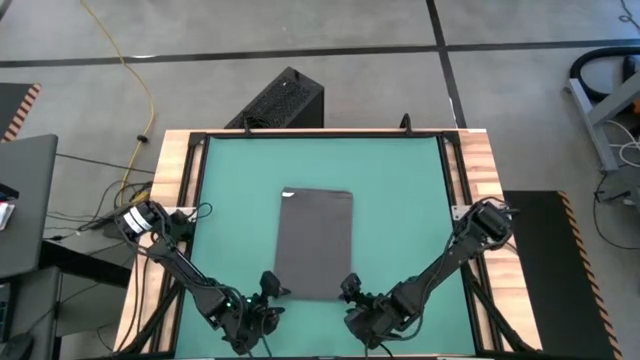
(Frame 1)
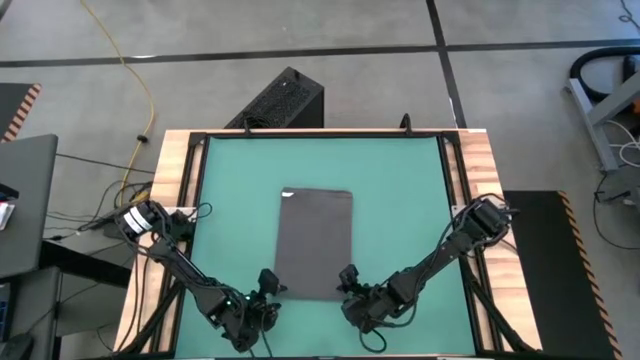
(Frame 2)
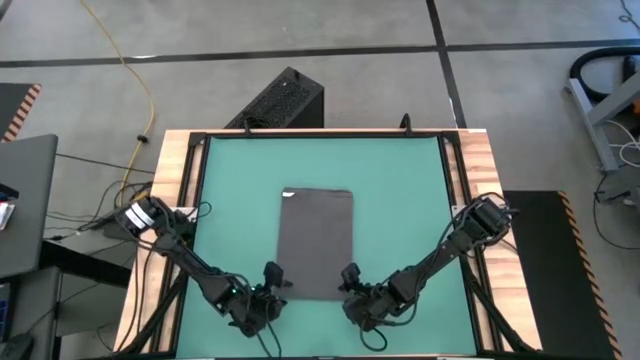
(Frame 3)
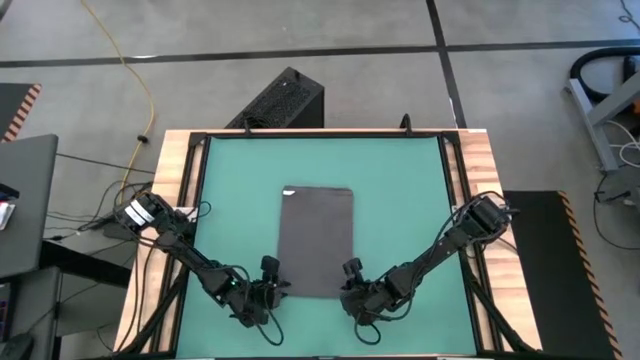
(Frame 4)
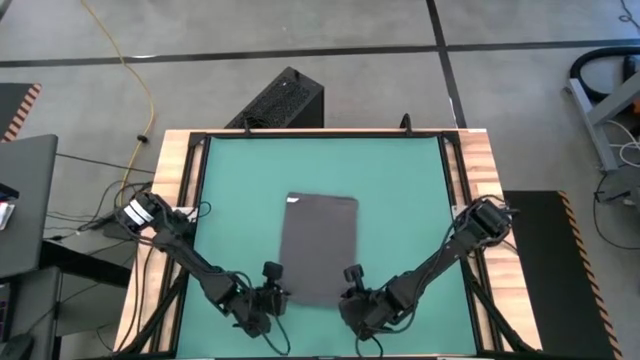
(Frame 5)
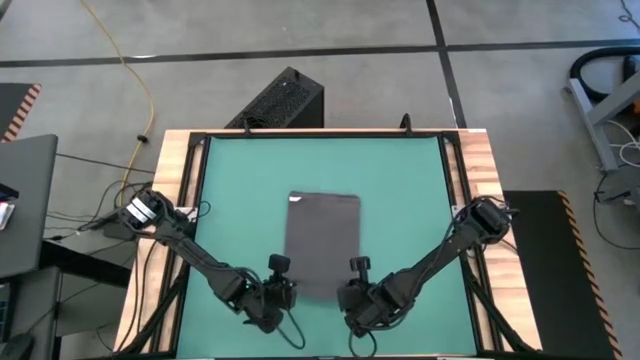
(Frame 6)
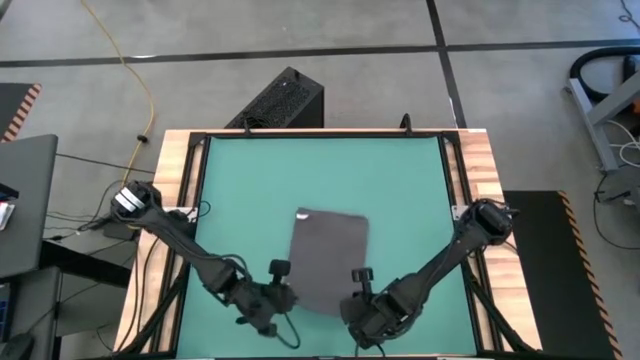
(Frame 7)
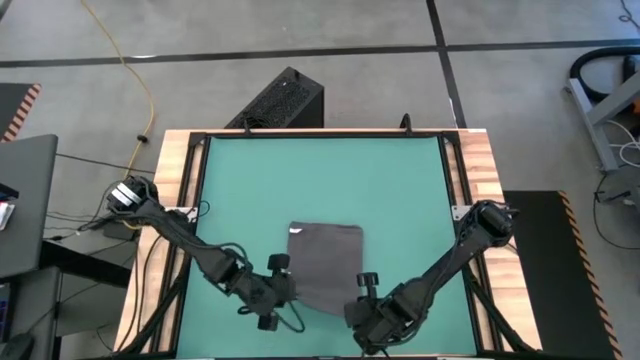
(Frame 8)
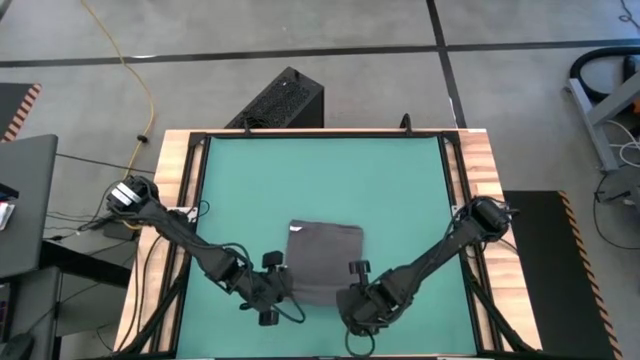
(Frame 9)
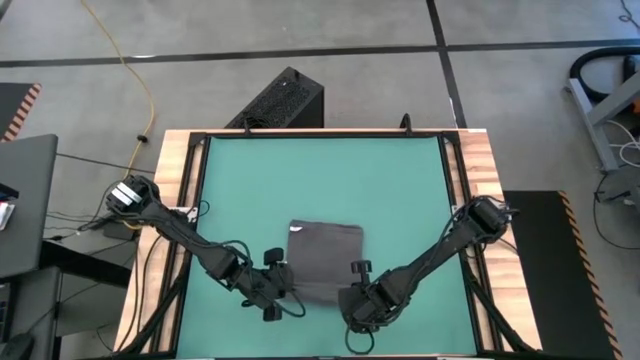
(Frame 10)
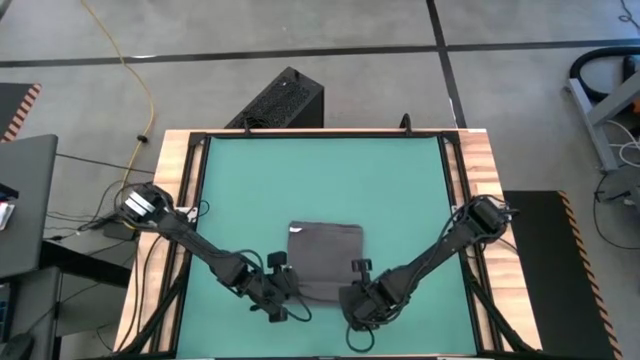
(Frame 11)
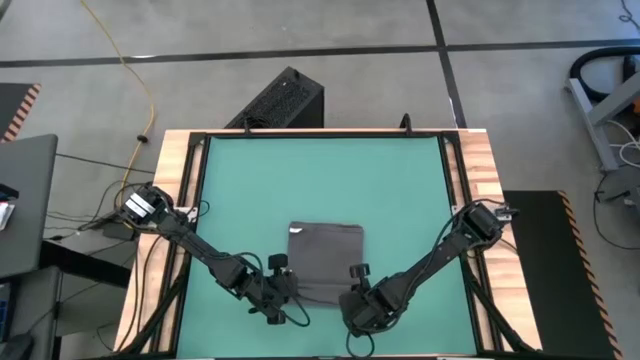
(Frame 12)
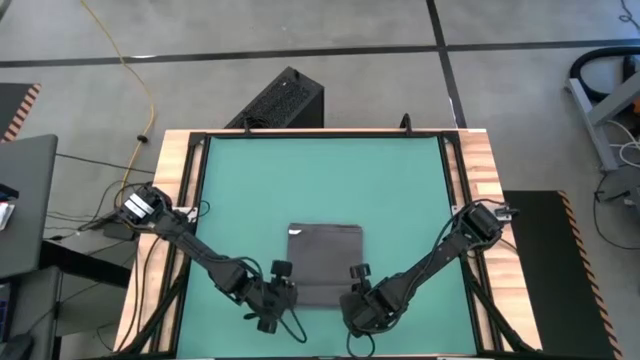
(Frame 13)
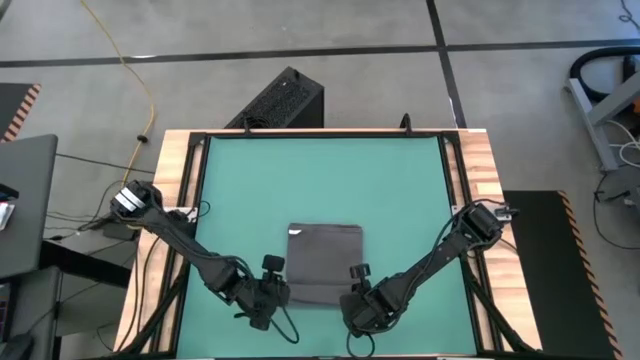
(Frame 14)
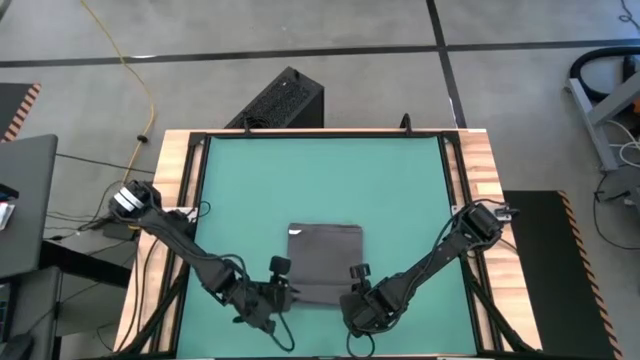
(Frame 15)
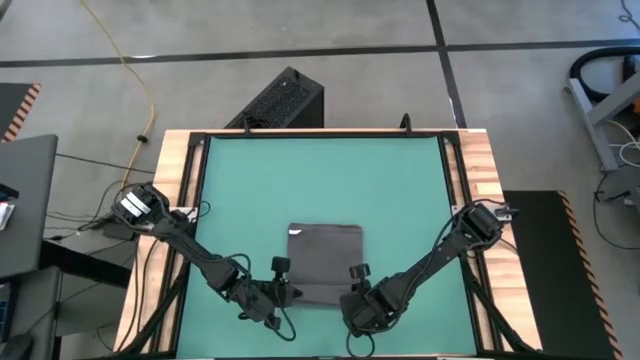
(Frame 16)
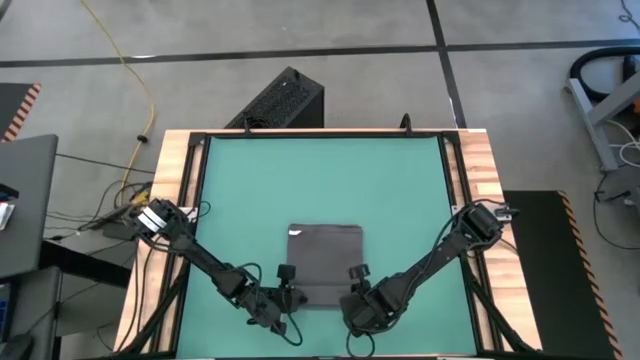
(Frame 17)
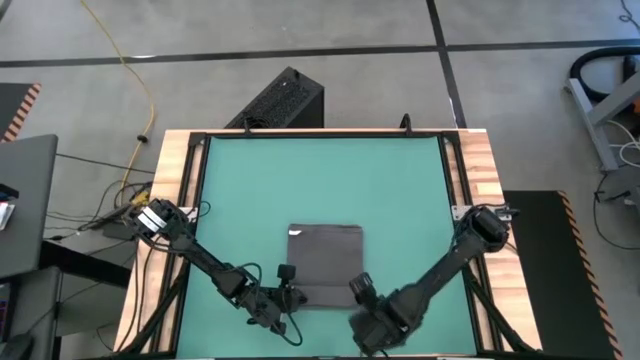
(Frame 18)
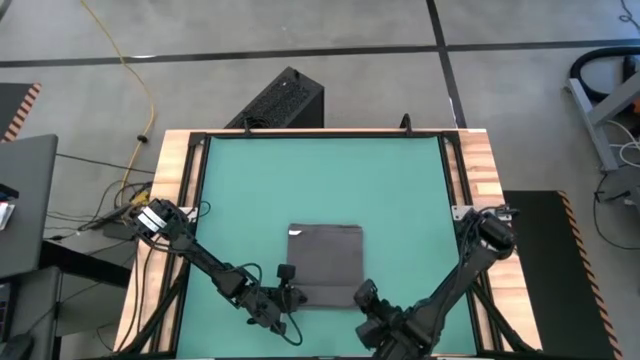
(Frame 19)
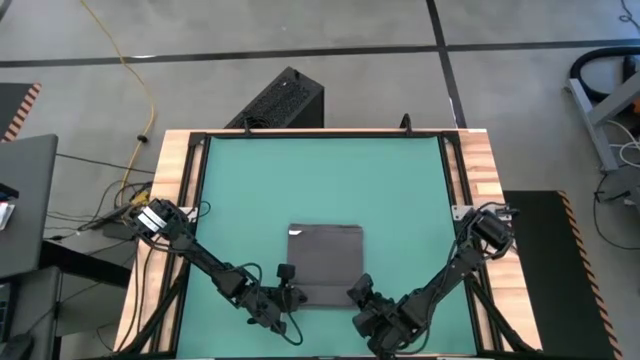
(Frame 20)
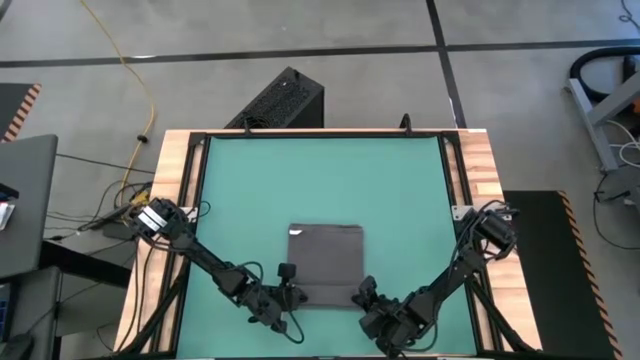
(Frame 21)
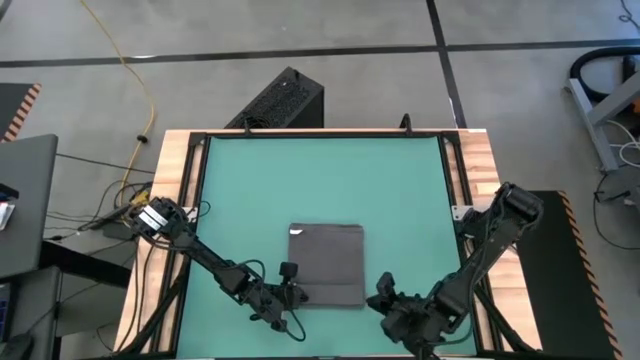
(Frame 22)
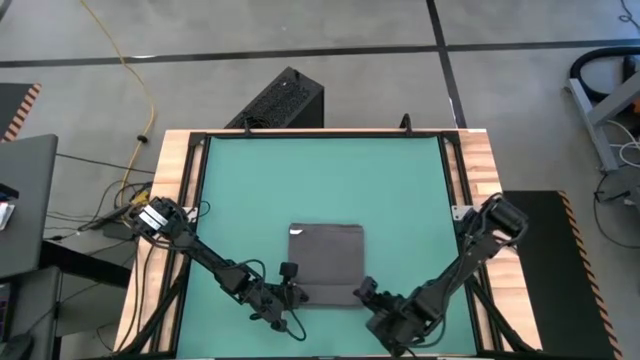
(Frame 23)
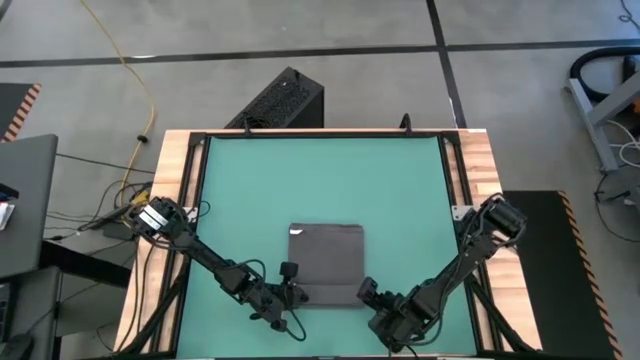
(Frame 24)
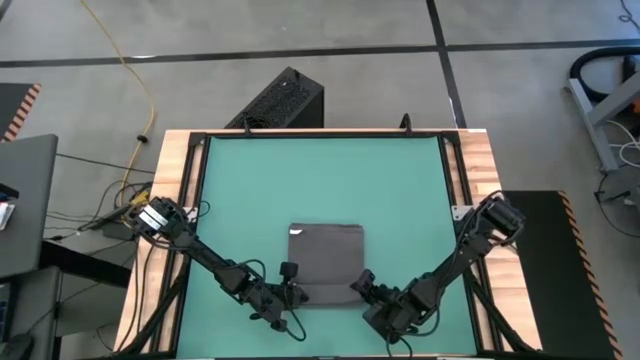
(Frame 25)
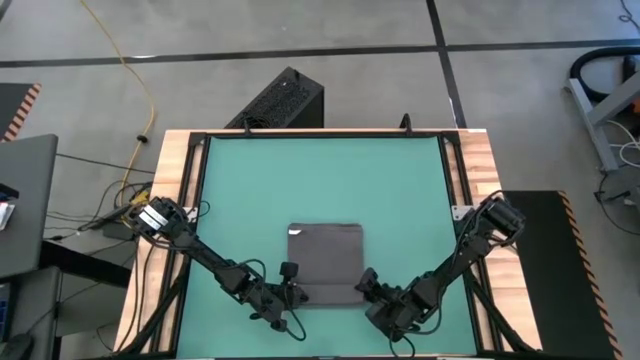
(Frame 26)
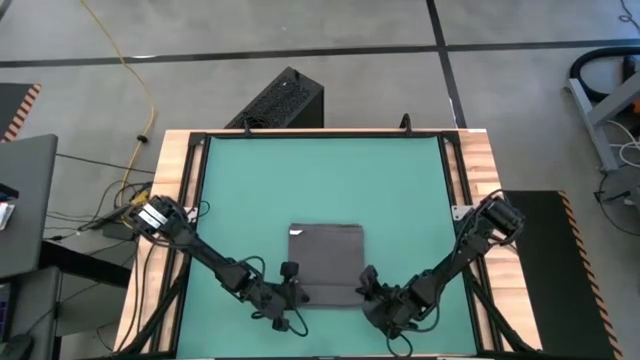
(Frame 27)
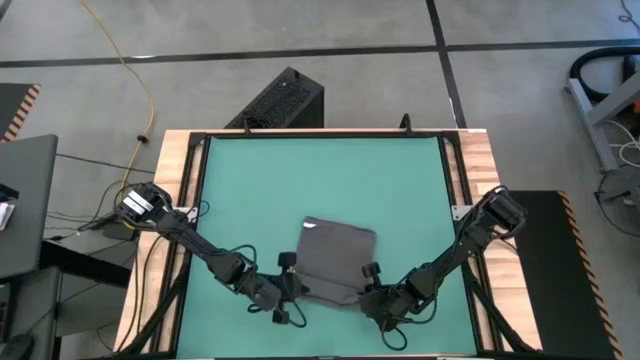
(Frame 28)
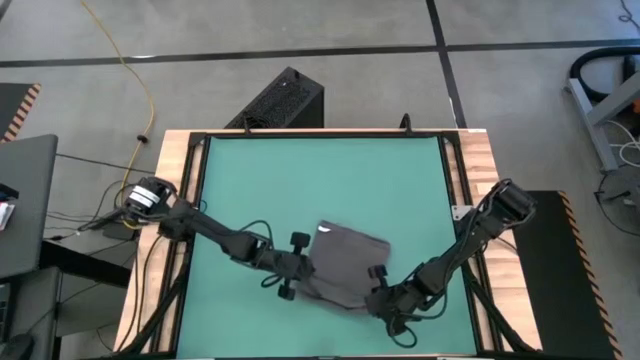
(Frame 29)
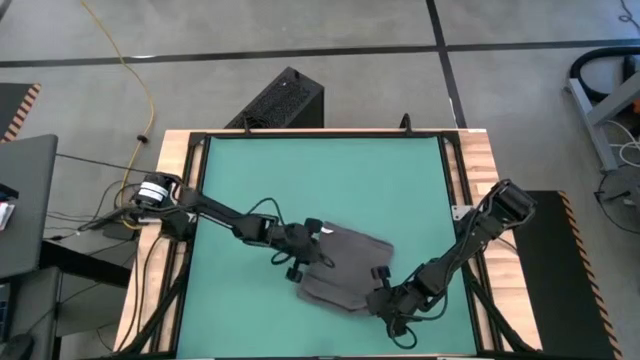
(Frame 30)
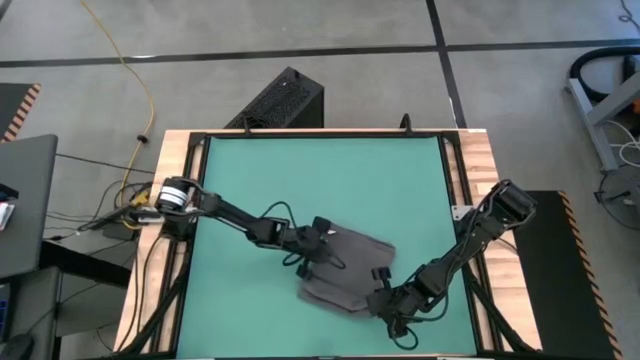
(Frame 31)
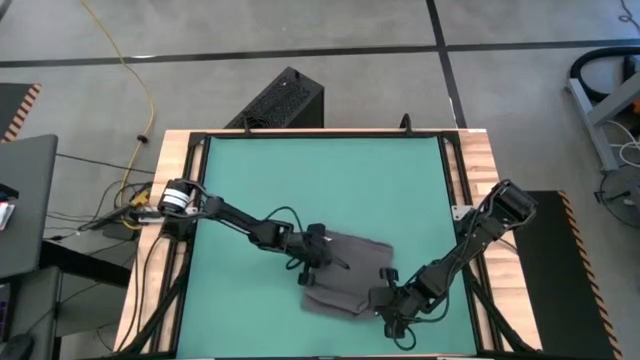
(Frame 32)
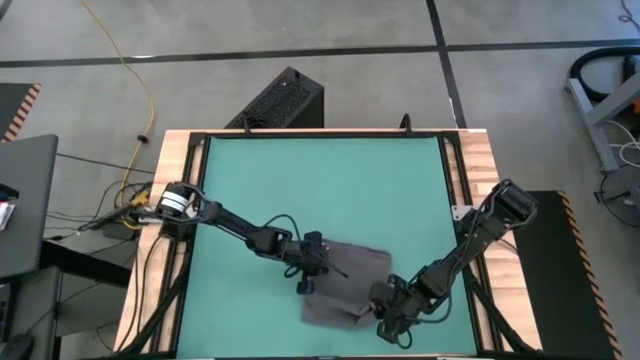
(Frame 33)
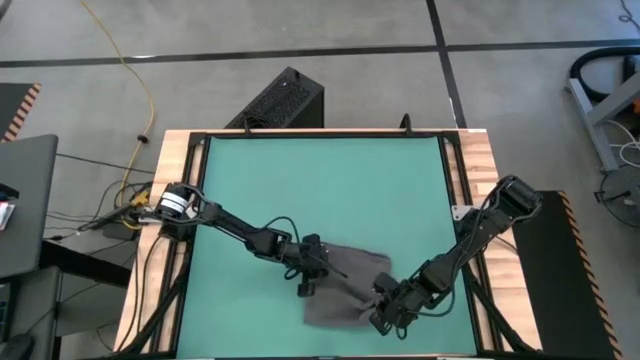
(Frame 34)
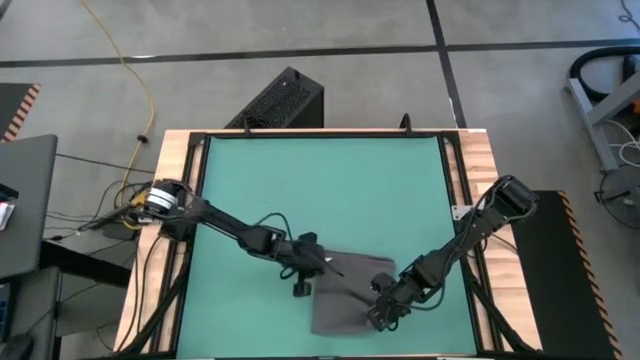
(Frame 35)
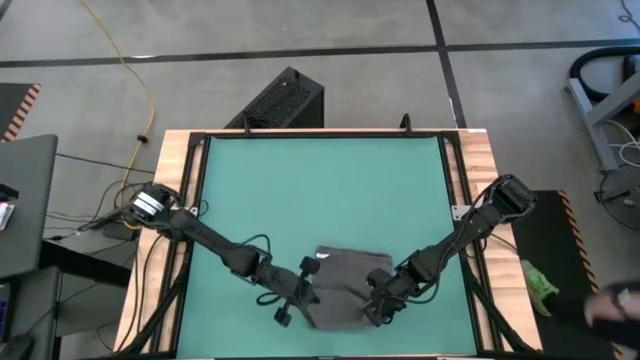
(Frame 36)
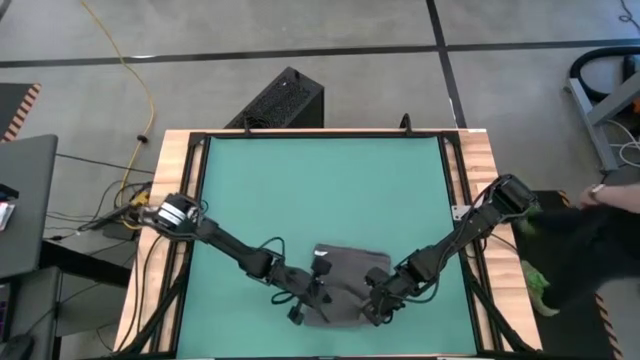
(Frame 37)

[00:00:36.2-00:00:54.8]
Task: Roll towel into tight, uniform cylinder
Roll the gray towel

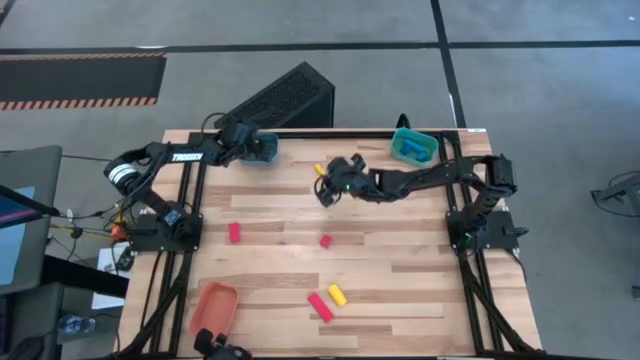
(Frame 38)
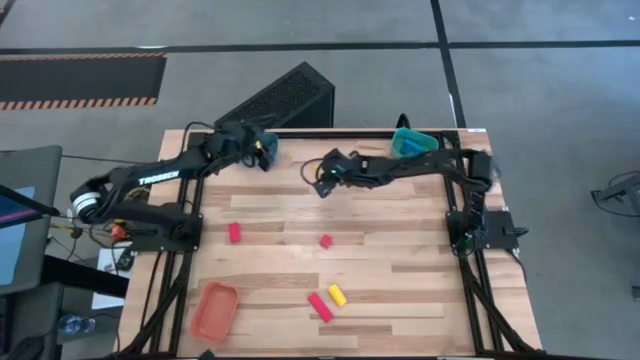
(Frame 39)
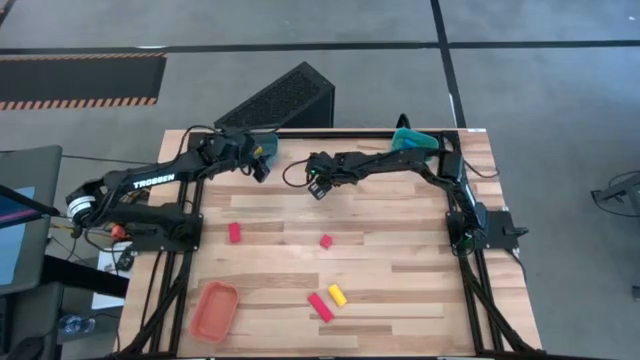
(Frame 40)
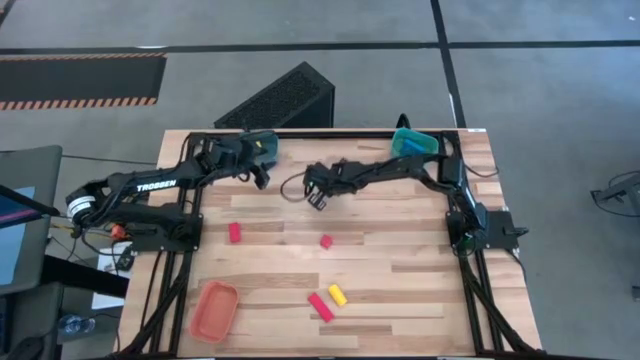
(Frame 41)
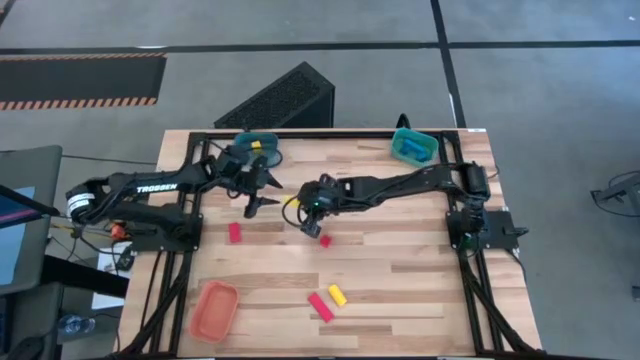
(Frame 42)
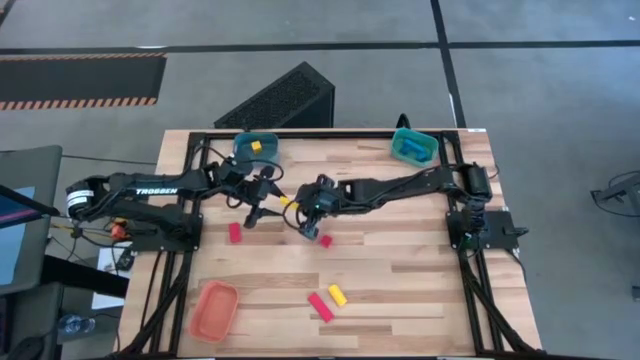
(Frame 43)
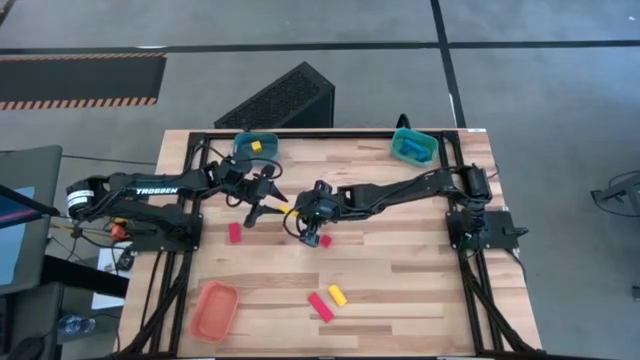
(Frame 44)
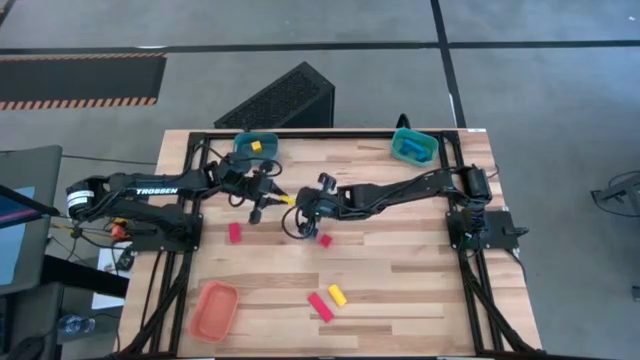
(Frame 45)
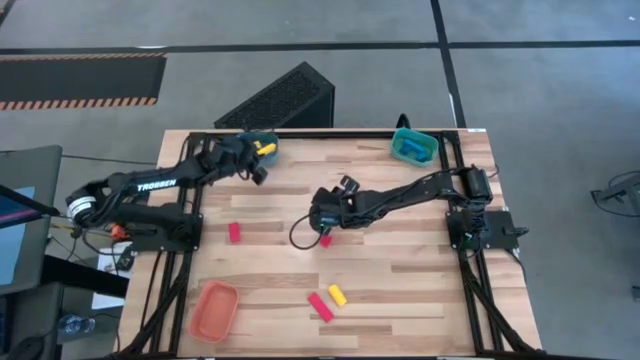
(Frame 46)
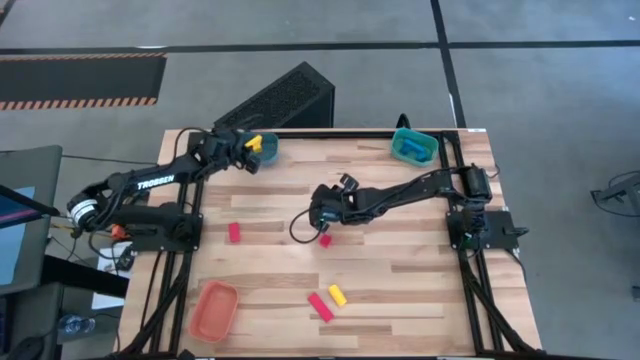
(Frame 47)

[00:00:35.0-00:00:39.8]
Task: Sort & place blocks by color
Put the top yellow block into the blue bin
